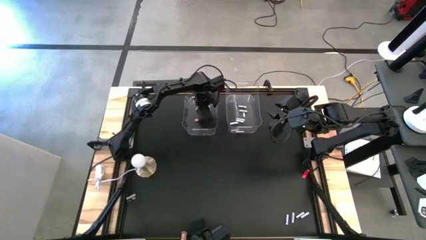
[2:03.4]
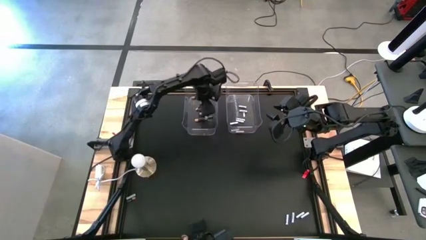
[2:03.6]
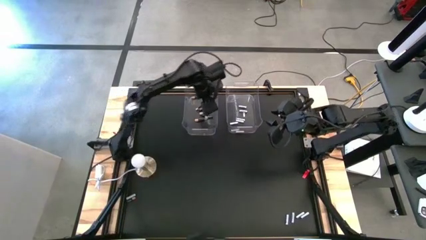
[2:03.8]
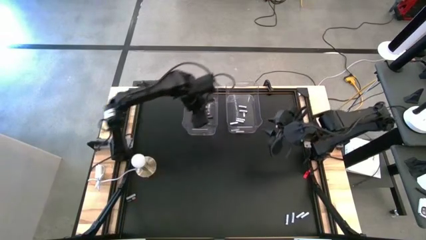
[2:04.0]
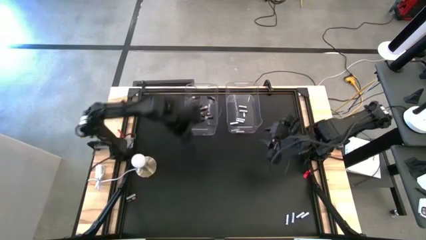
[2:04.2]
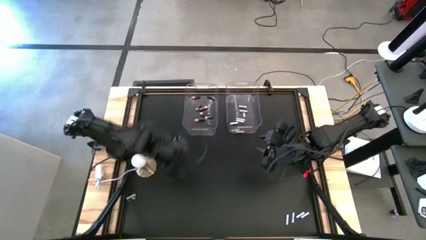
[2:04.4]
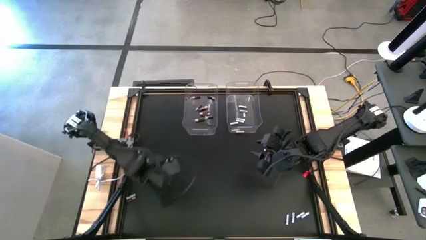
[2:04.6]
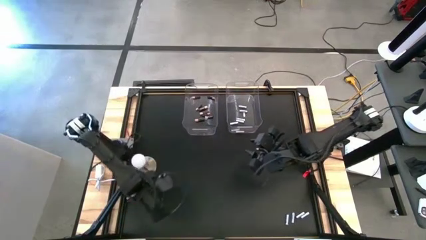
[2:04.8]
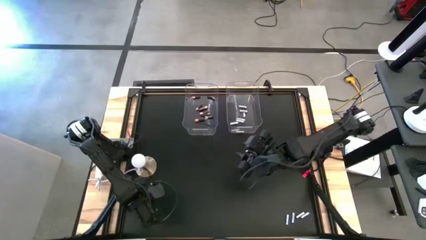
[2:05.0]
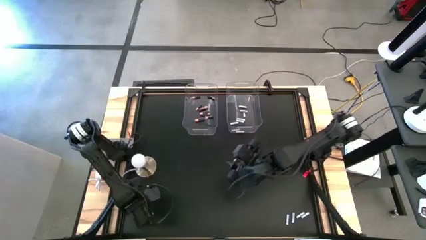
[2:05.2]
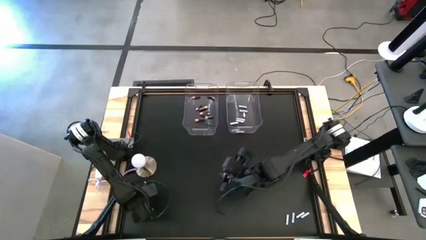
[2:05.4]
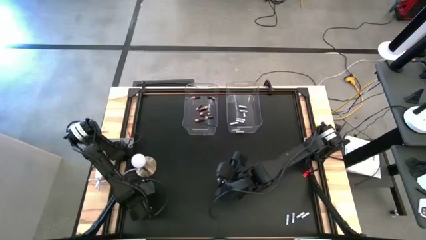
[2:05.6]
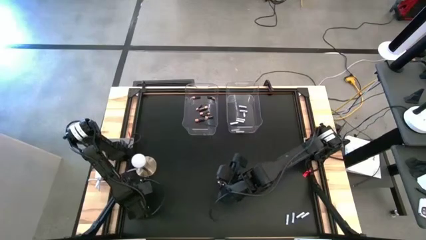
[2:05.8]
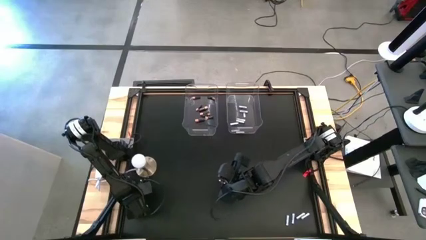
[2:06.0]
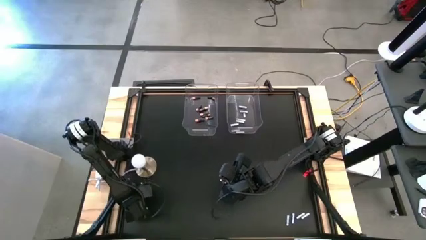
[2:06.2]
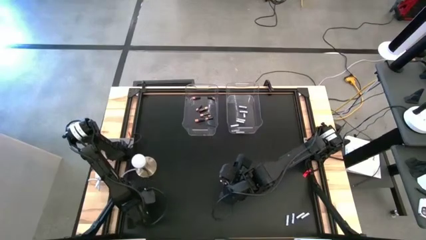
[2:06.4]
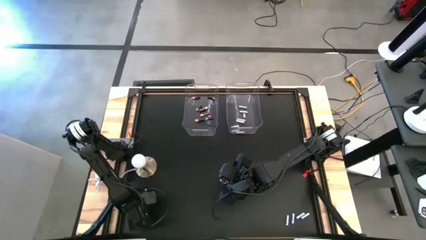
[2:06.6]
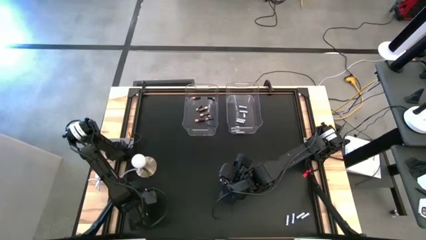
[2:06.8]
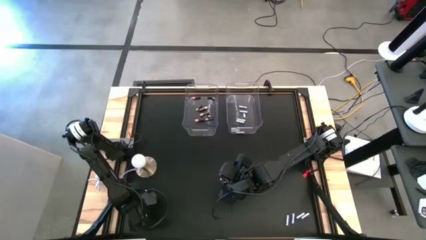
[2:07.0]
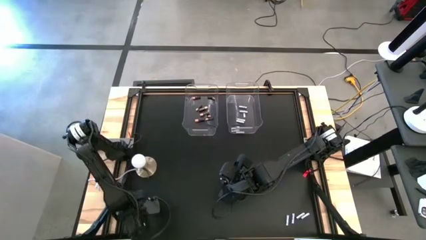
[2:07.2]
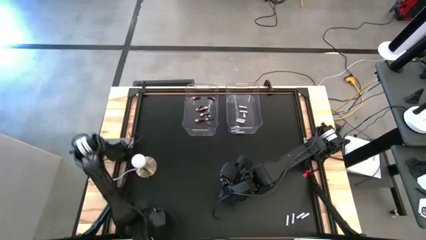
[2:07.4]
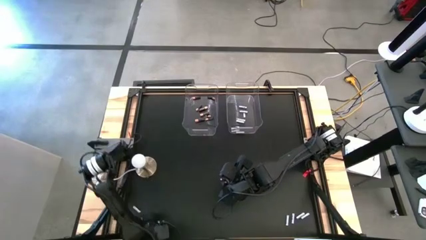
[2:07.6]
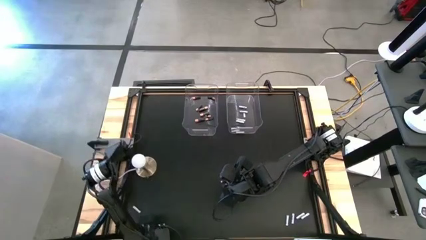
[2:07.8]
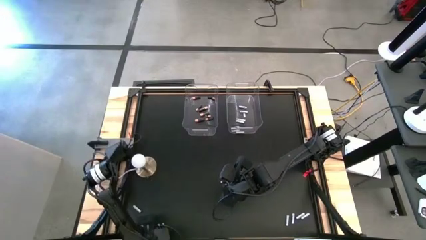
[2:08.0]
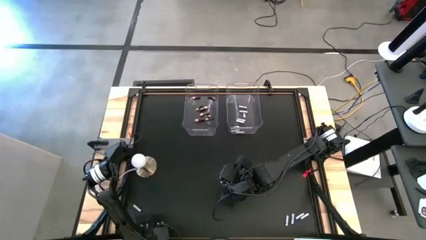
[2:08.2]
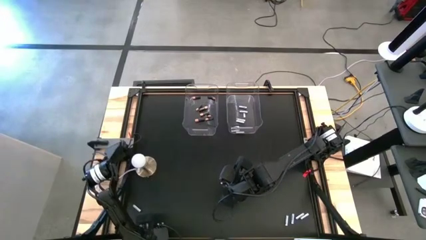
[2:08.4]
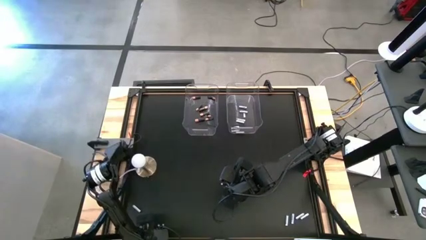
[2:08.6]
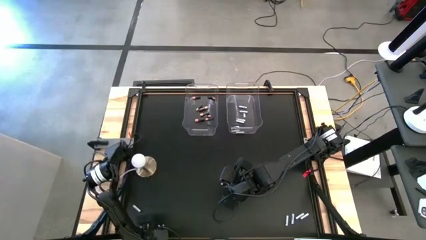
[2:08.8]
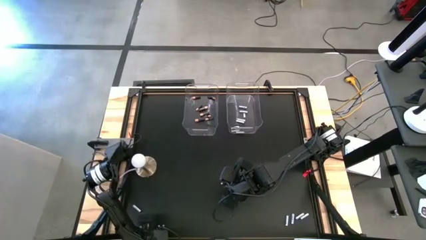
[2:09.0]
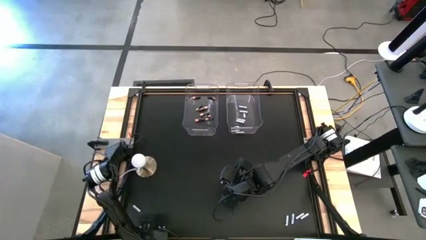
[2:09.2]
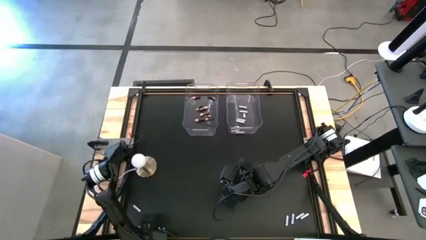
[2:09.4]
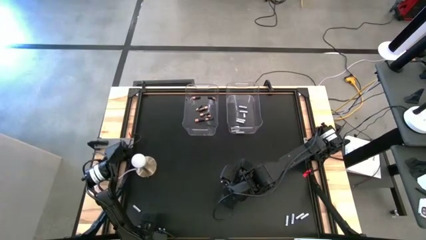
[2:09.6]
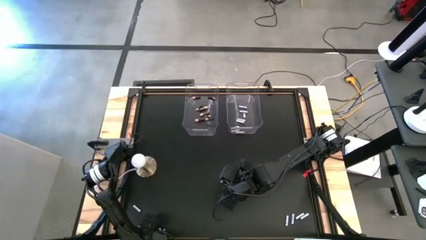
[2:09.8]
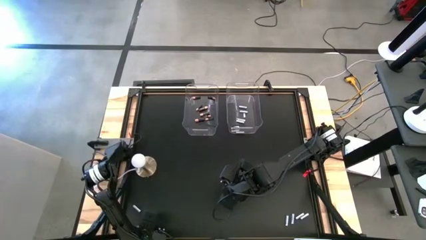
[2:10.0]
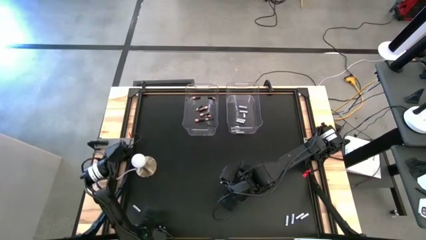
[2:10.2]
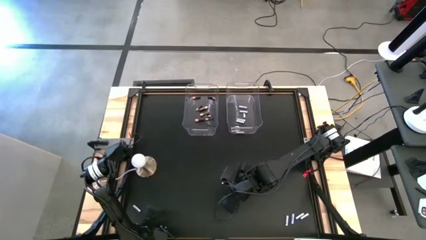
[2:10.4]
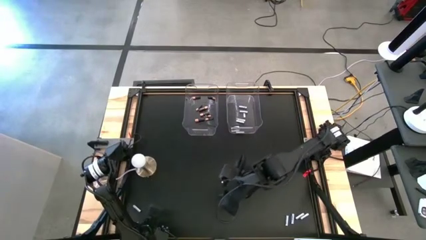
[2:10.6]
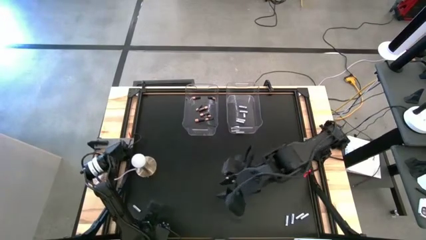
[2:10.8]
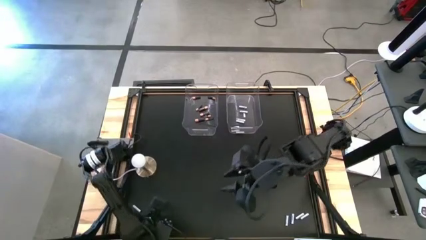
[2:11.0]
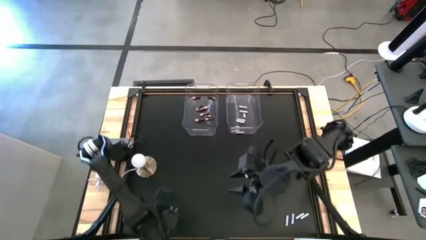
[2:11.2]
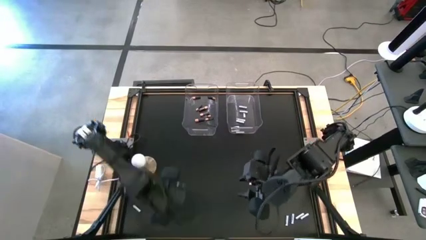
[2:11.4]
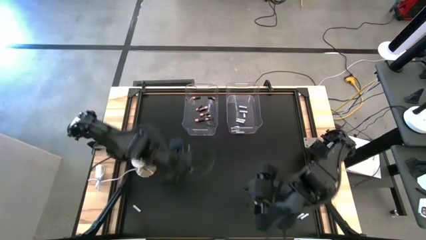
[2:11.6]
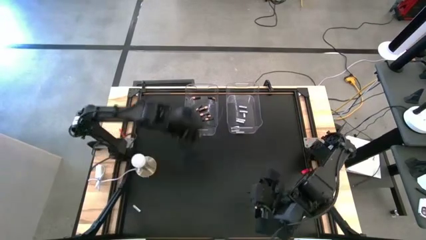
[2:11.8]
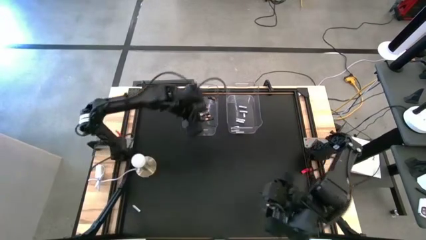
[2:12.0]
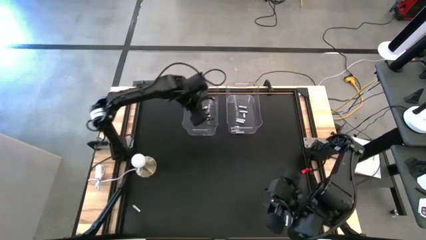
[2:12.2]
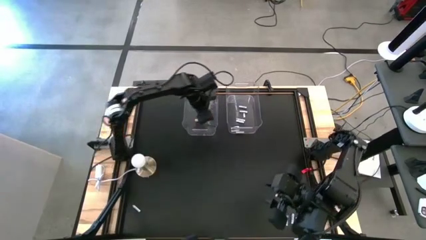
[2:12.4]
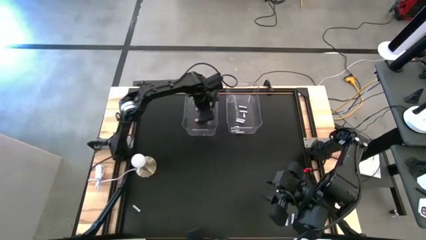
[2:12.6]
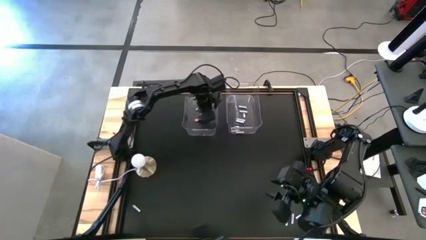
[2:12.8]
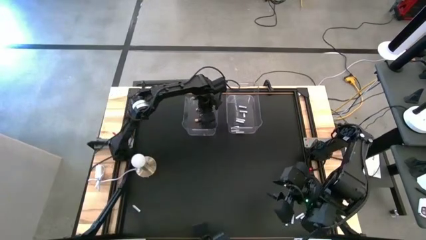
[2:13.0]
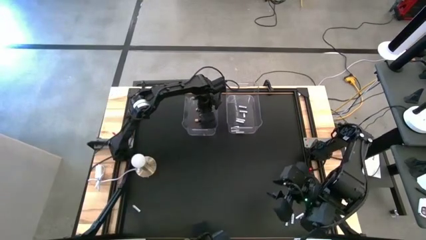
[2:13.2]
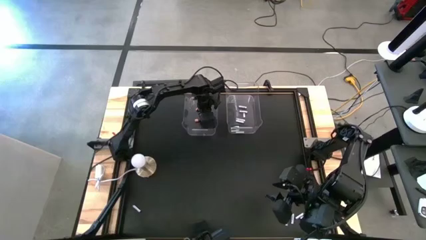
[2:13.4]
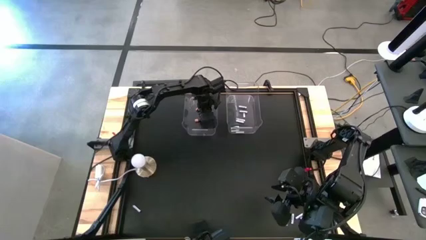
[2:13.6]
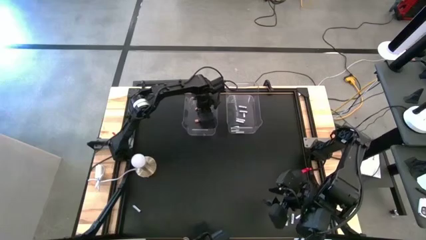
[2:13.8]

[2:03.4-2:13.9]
Task: Sort batteries
Put the black battery into the left transparent bin
